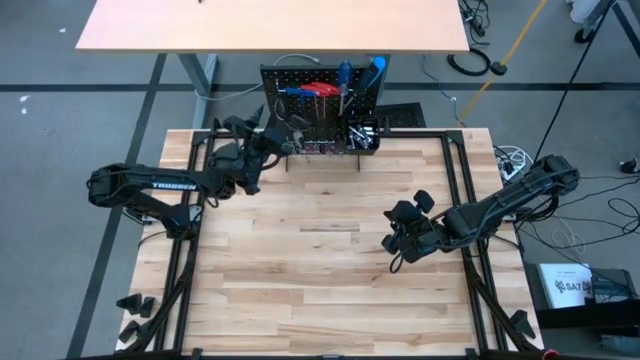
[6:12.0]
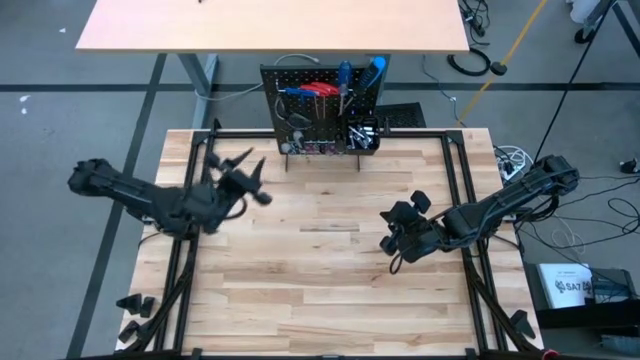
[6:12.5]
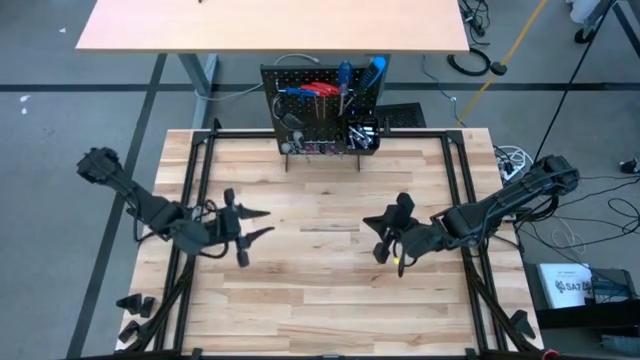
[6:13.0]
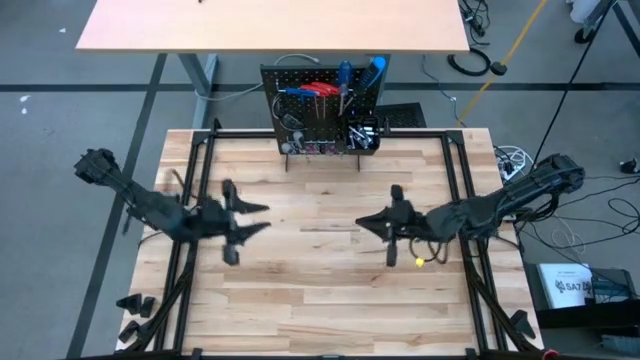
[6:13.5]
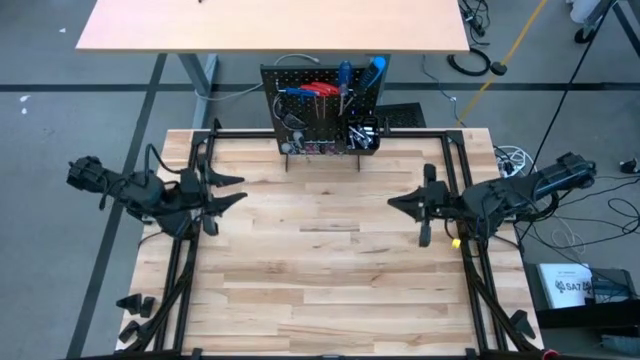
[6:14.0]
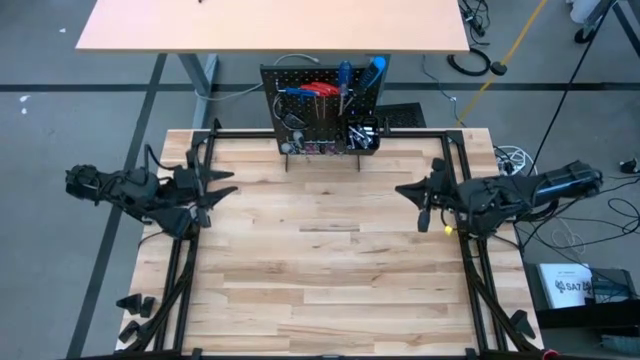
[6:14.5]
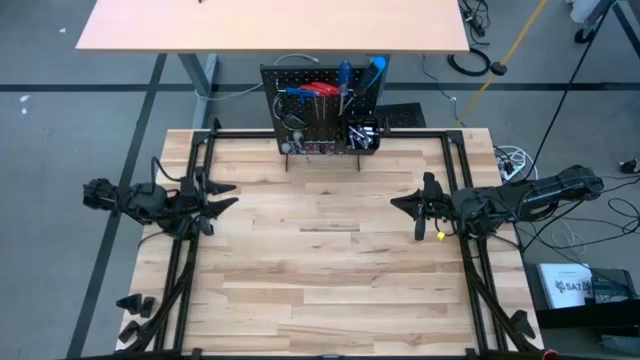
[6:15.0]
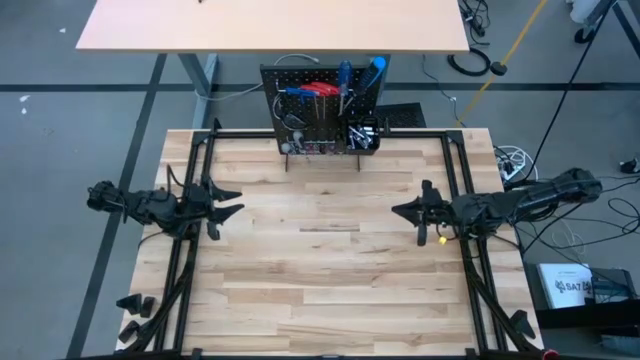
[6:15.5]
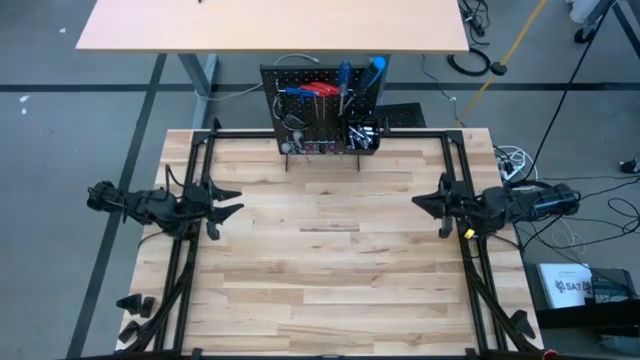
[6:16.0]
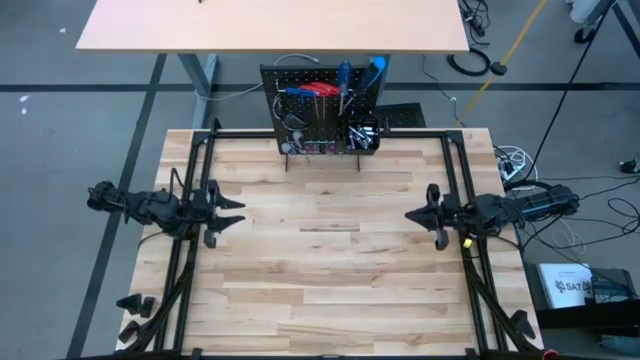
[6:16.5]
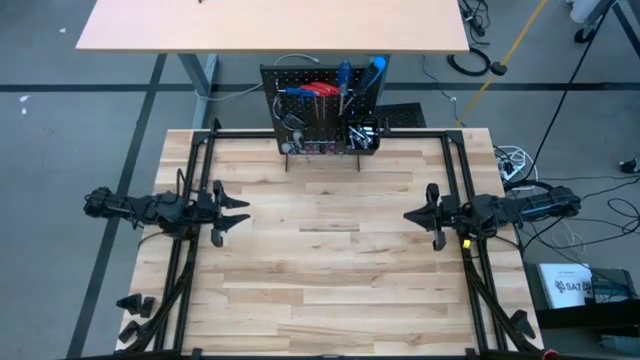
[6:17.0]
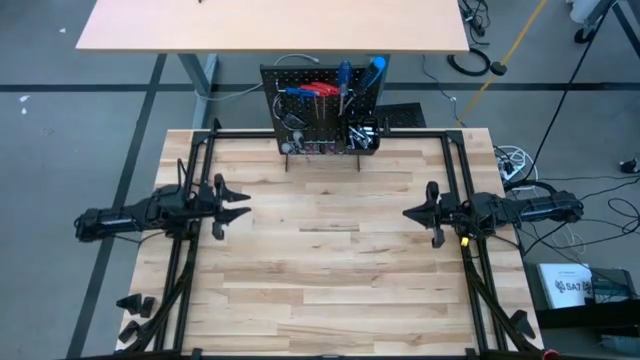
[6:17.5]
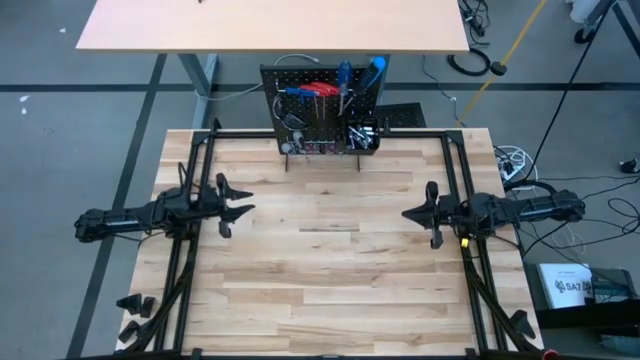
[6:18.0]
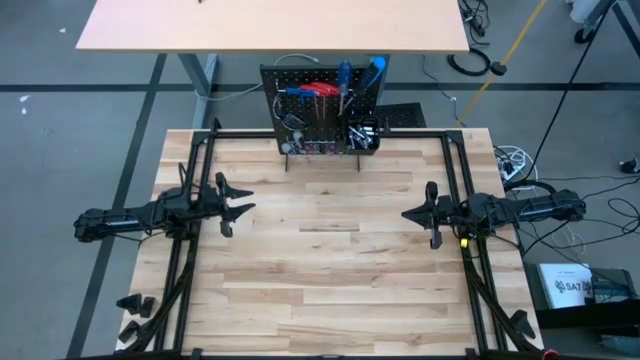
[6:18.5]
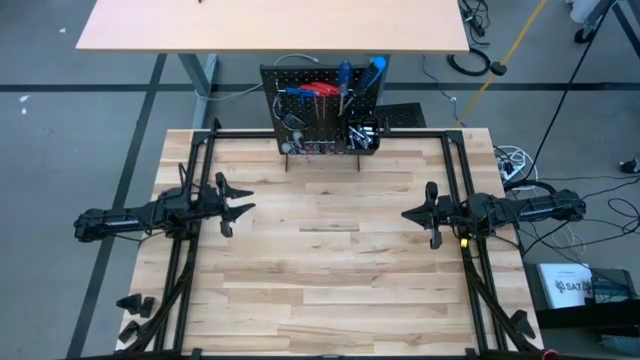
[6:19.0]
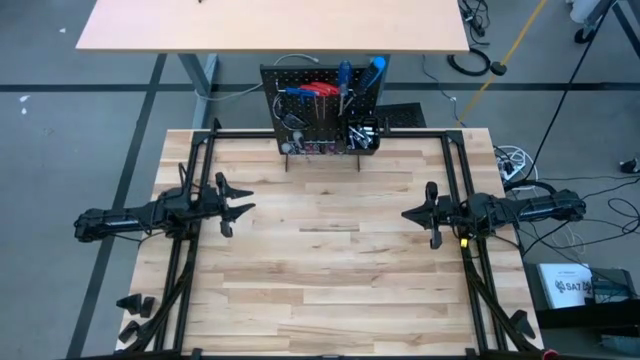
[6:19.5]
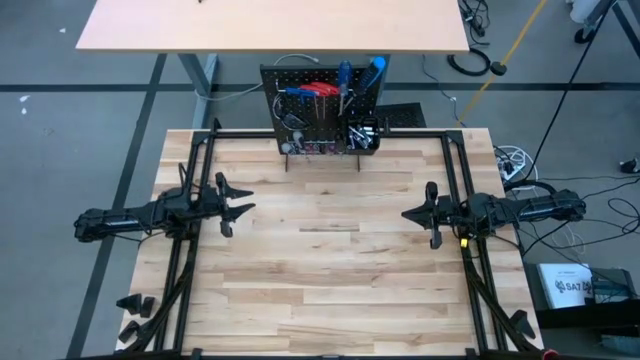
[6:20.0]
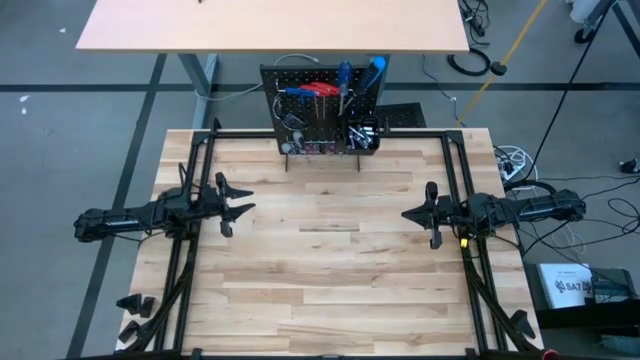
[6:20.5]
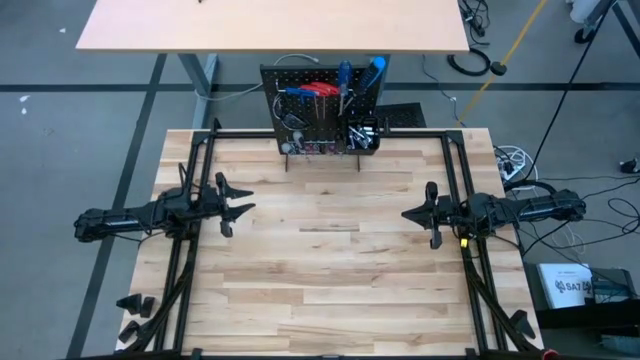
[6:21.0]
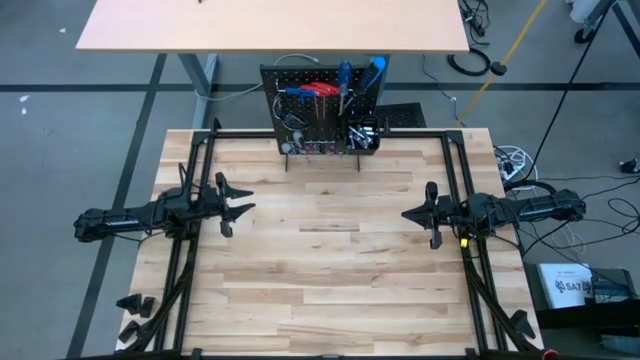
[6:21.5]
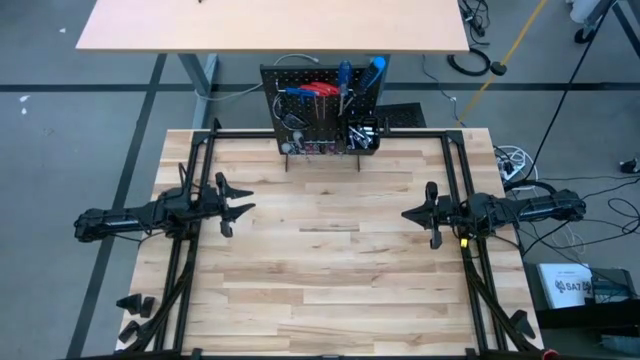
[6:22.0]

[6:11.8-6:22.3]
Task: Hang tools onto peg board
Return to Home Position

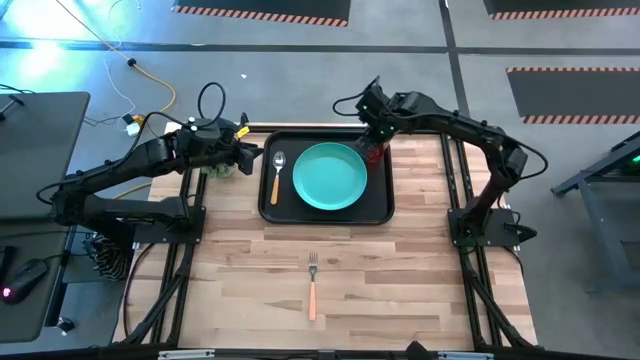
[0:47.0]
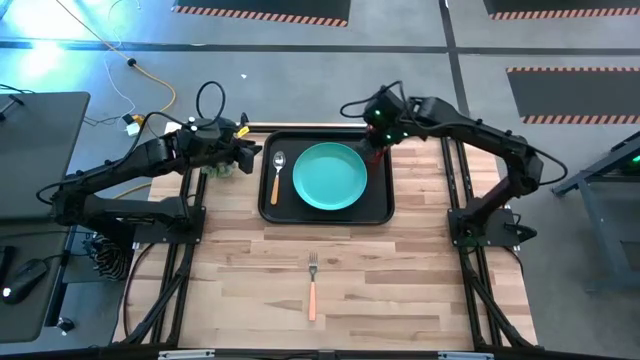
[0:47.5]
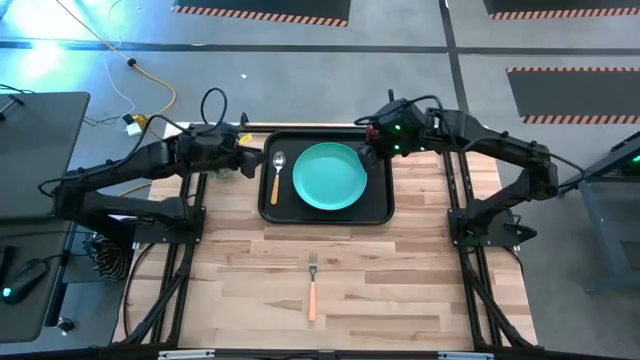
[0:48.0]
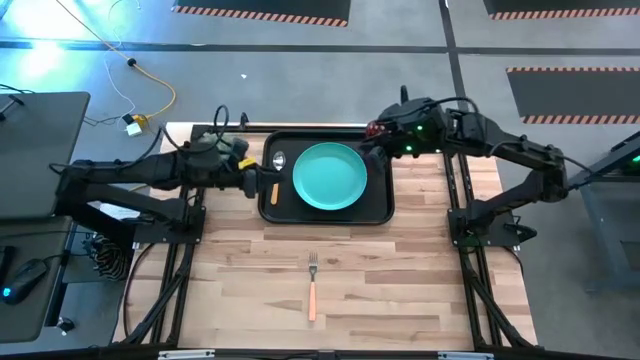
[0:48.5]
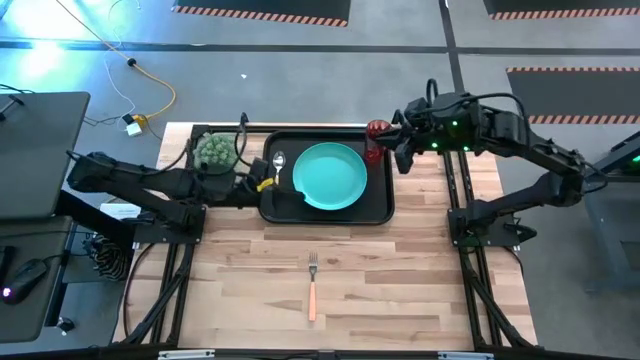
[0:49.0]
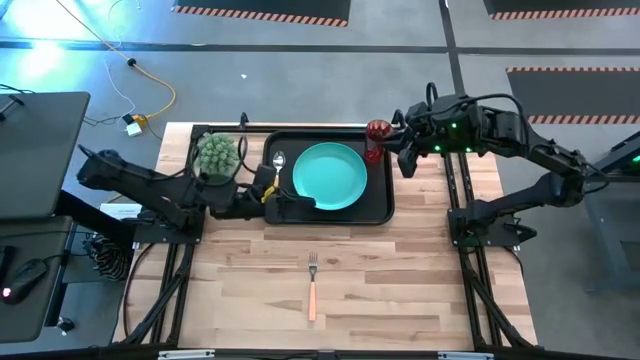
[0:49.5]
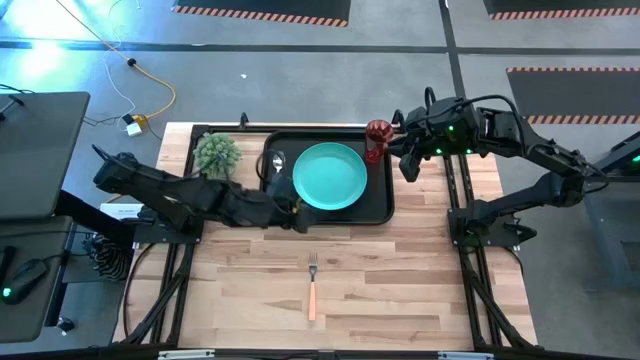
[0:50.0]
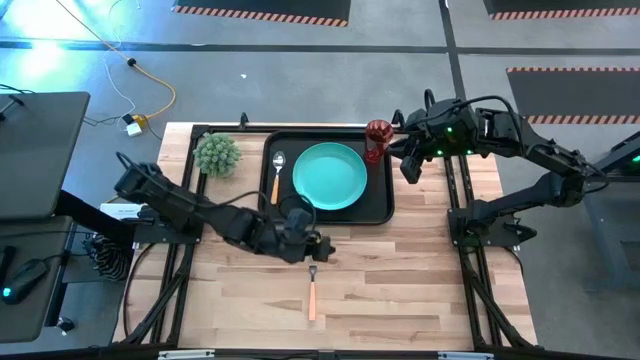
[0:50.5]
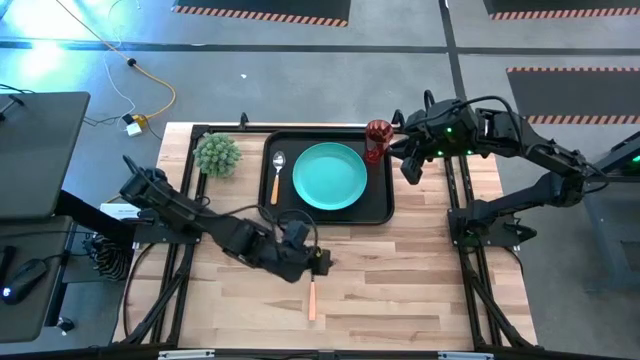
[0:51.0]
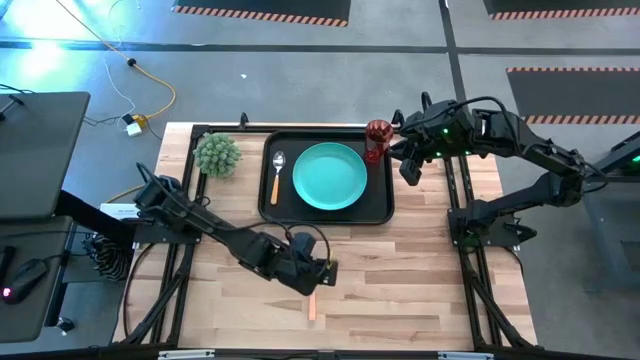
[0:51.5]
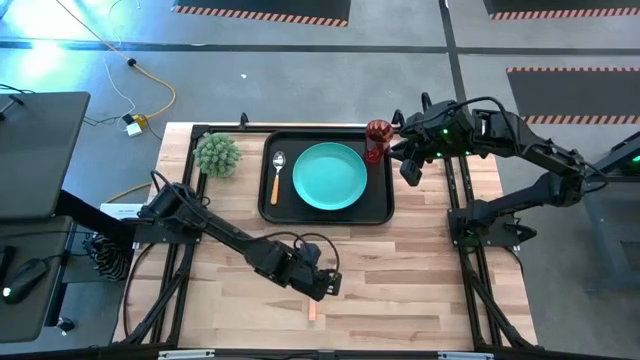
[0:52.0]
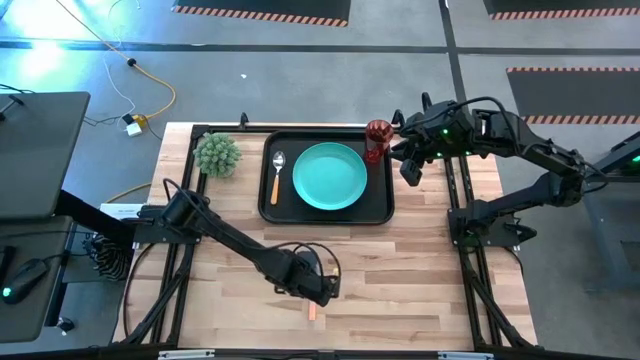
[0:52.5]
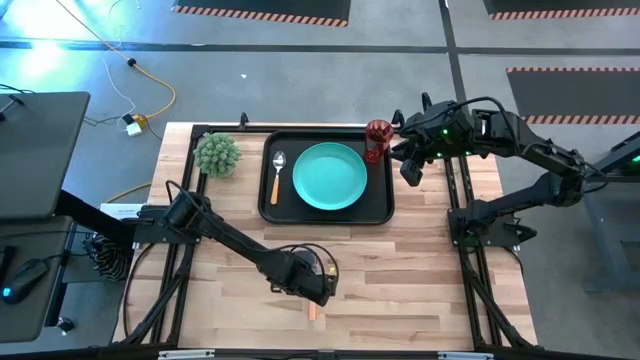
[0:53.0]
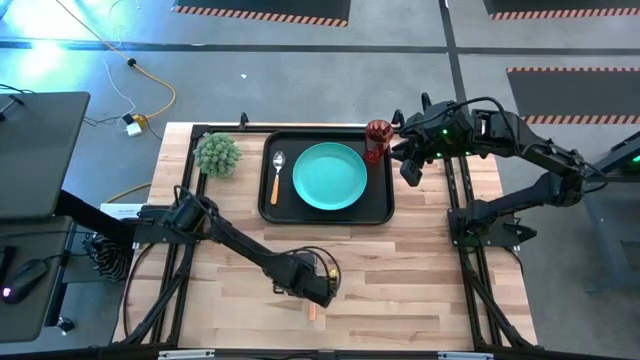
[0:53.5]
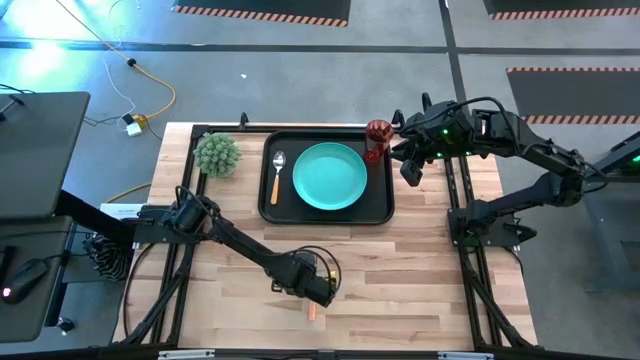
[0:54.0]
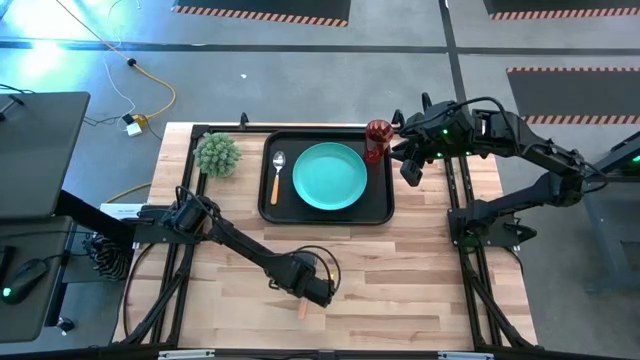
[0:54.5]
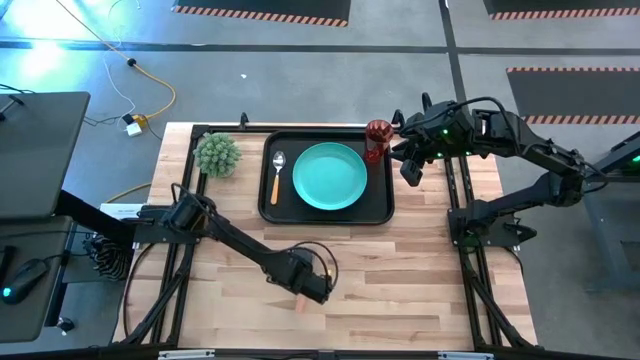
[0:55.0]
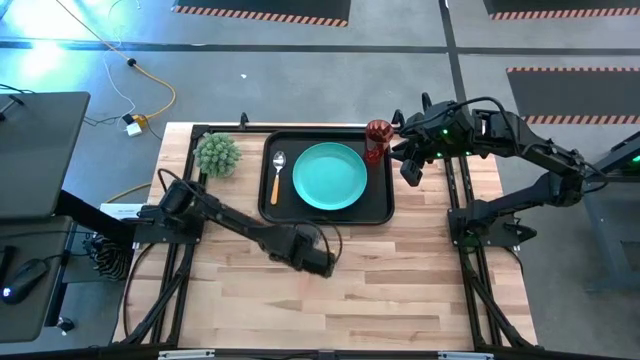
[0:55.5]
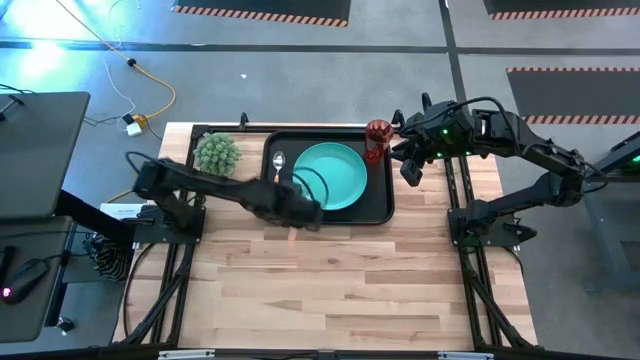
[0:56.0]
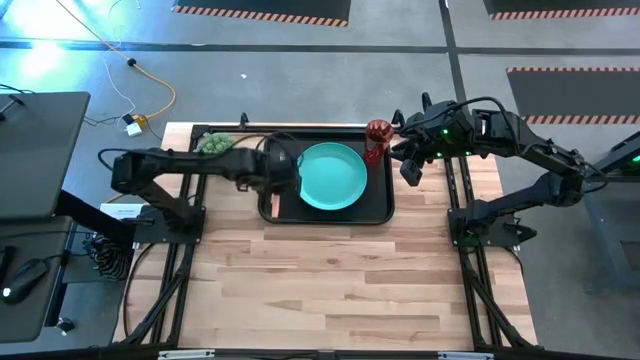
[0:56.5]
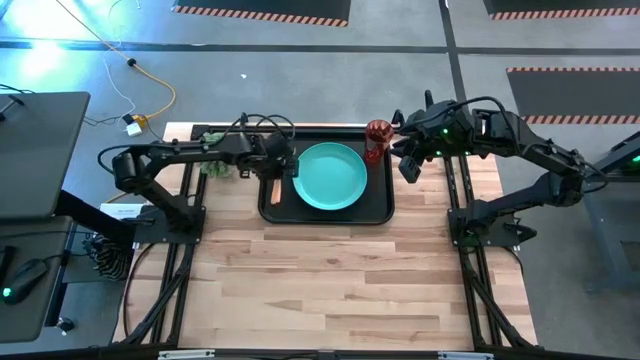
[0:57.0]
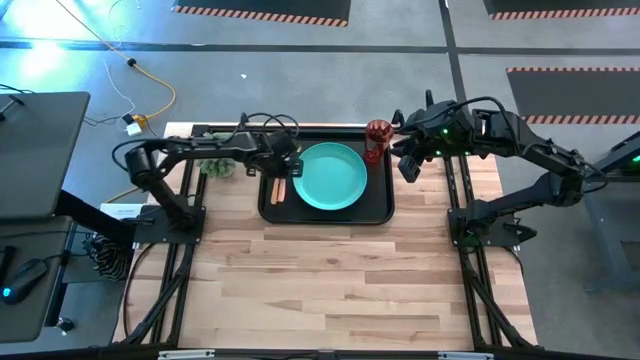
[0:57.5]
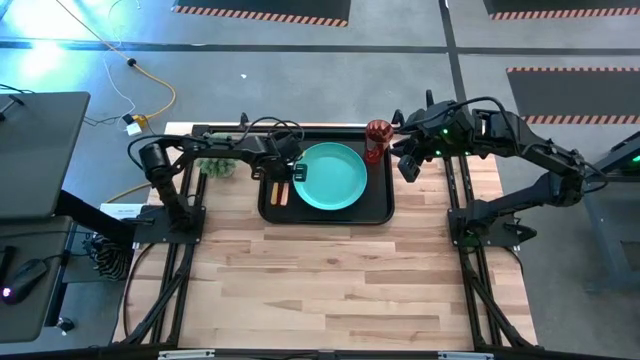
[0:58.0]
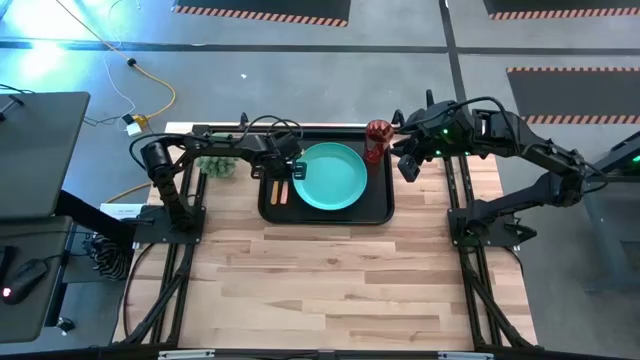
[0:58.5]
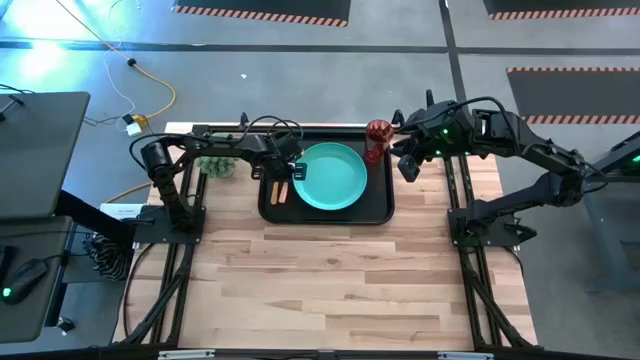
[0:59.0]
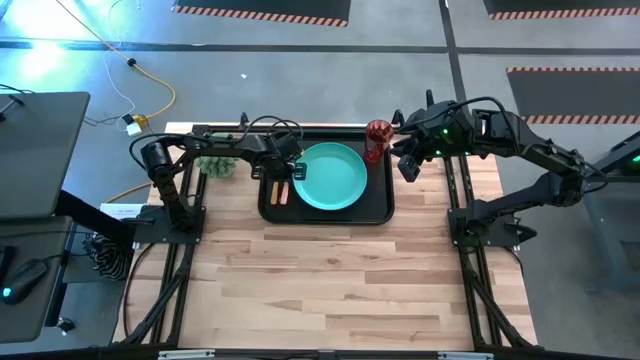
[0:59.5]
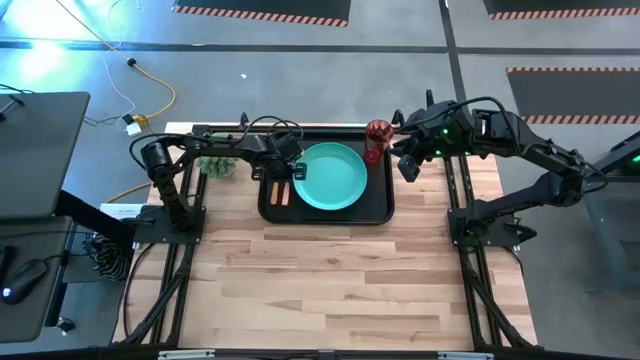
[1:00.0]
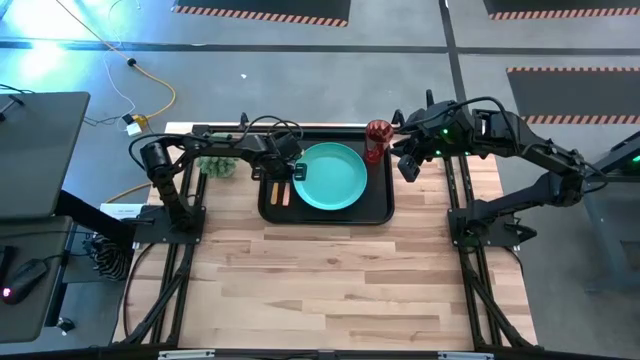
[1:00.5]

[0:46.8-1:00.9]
Task: Pick and place plate/cup/fork/spoon on tray
Put the light brown fork on the black table tray
